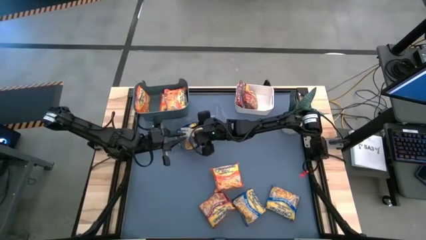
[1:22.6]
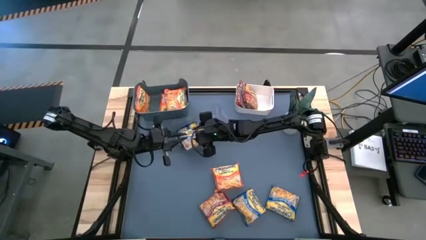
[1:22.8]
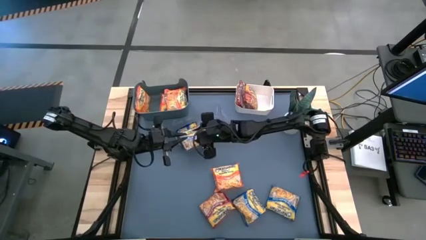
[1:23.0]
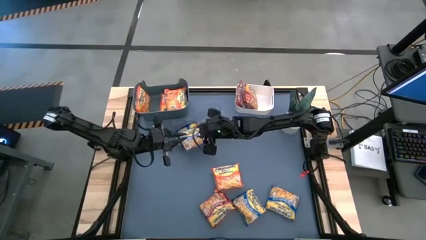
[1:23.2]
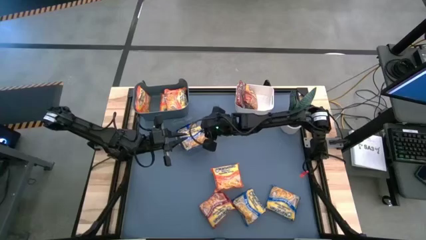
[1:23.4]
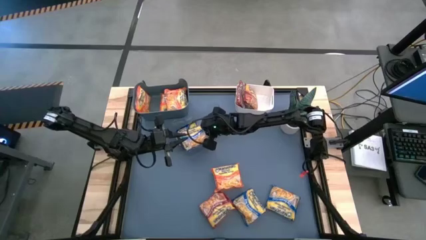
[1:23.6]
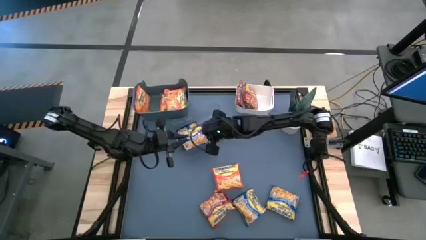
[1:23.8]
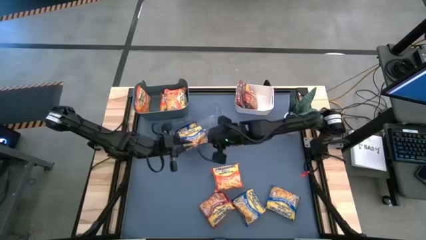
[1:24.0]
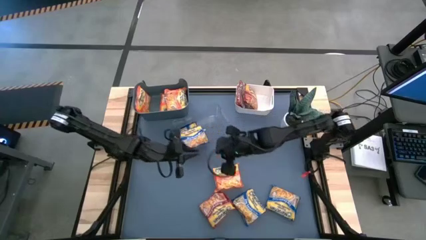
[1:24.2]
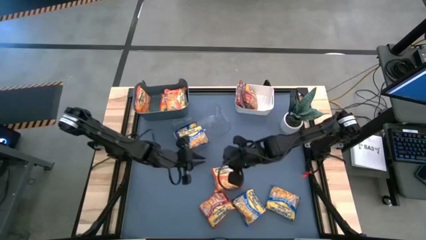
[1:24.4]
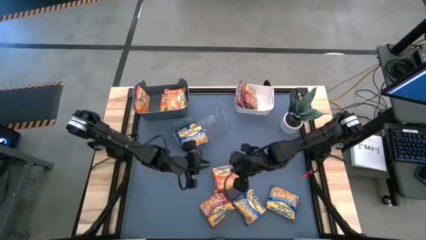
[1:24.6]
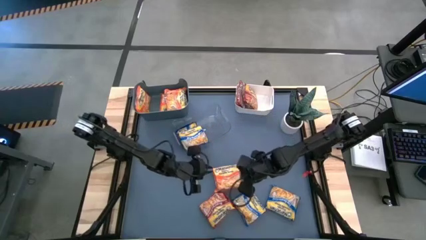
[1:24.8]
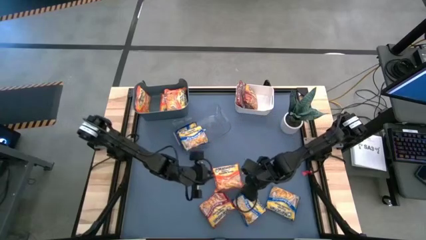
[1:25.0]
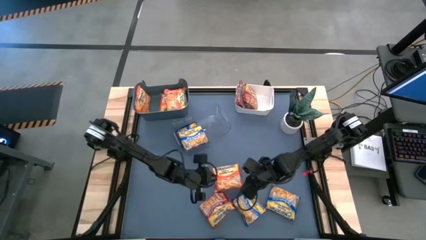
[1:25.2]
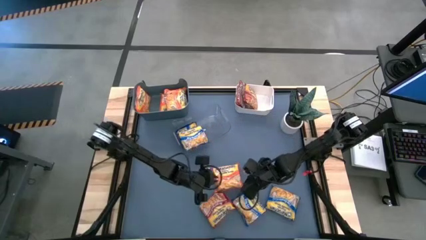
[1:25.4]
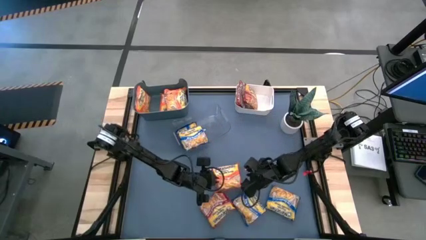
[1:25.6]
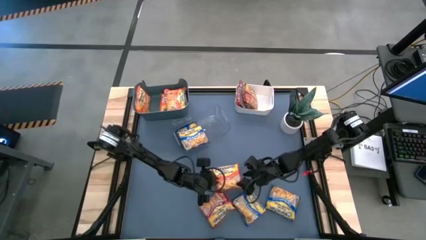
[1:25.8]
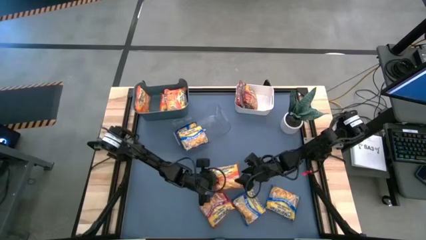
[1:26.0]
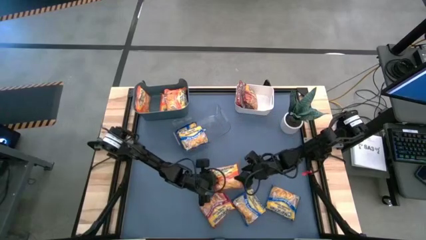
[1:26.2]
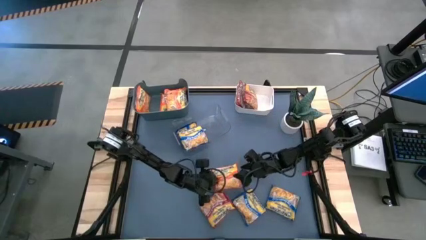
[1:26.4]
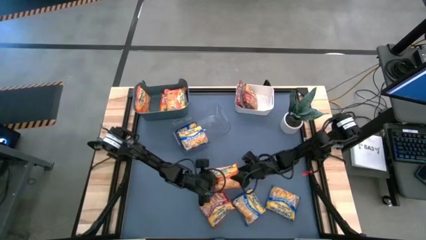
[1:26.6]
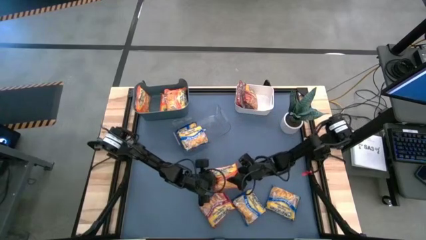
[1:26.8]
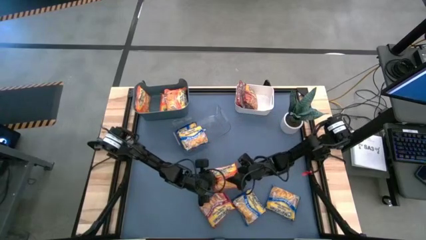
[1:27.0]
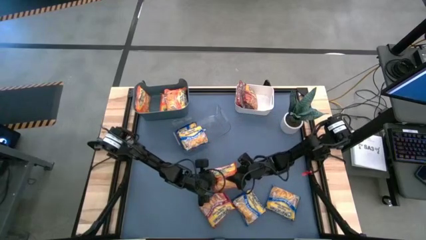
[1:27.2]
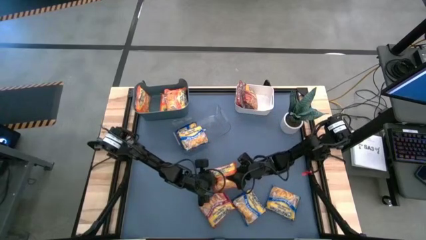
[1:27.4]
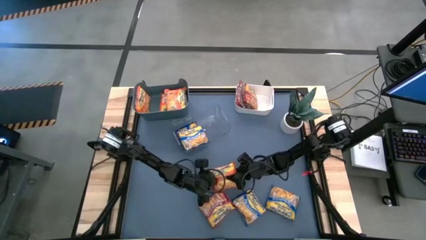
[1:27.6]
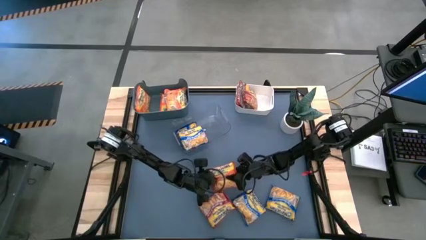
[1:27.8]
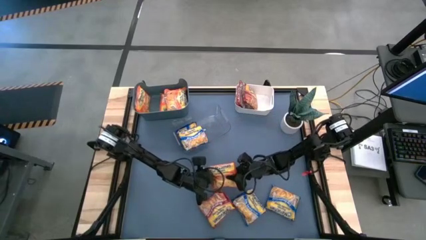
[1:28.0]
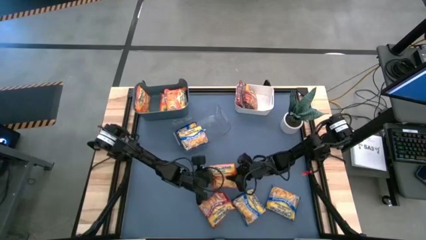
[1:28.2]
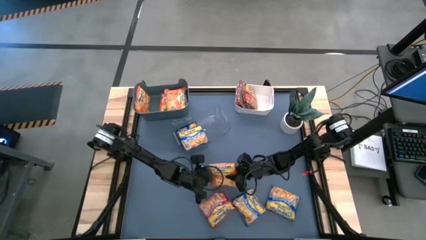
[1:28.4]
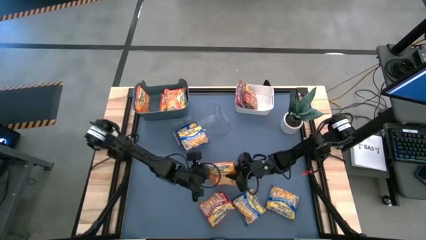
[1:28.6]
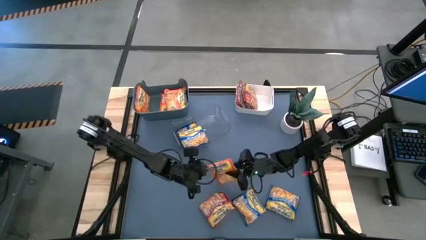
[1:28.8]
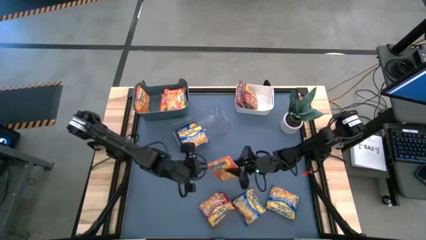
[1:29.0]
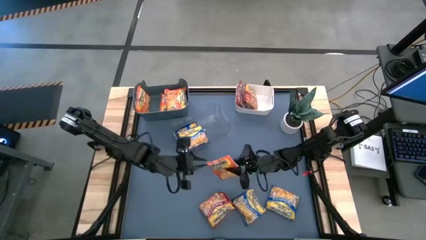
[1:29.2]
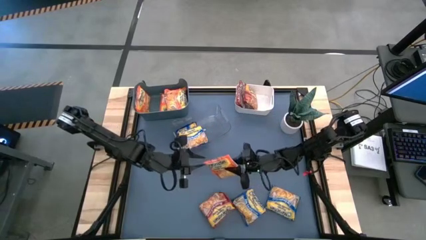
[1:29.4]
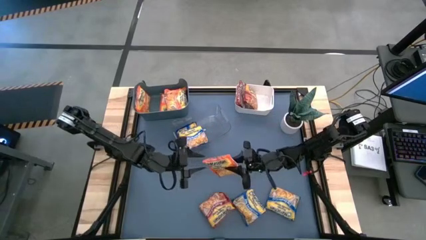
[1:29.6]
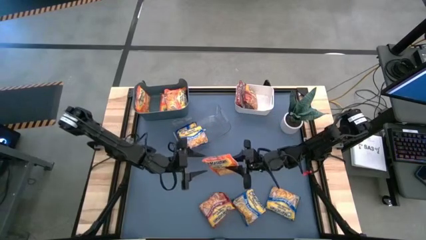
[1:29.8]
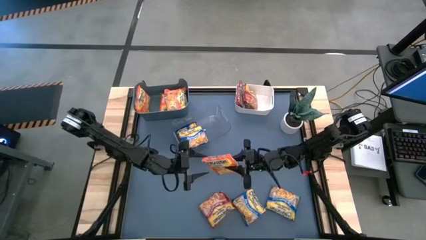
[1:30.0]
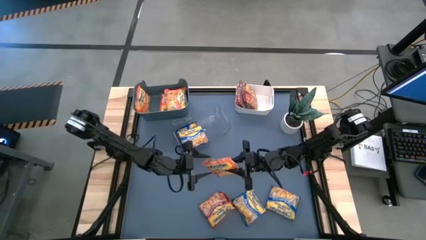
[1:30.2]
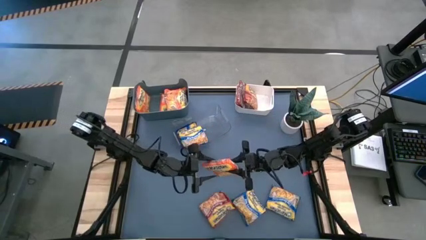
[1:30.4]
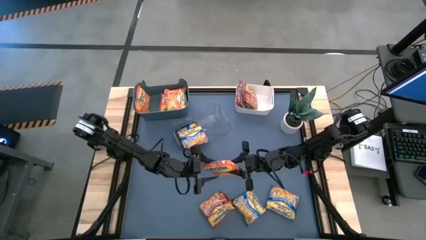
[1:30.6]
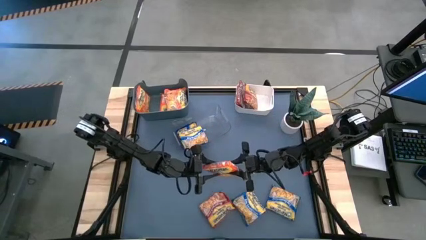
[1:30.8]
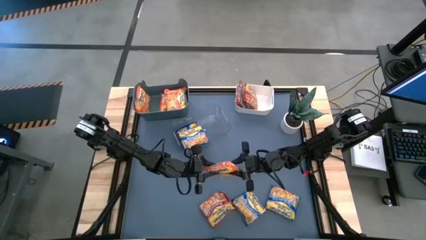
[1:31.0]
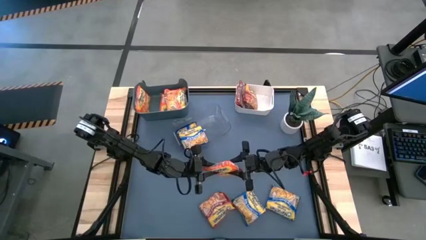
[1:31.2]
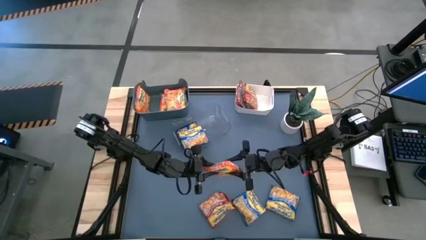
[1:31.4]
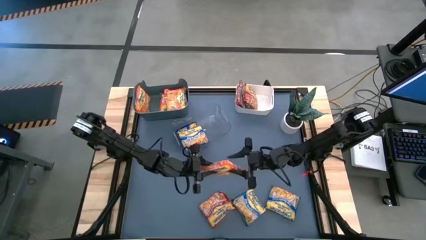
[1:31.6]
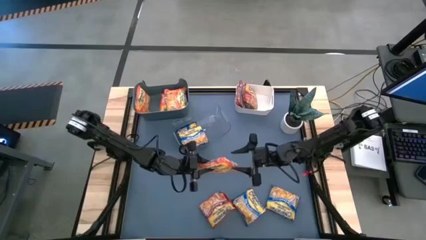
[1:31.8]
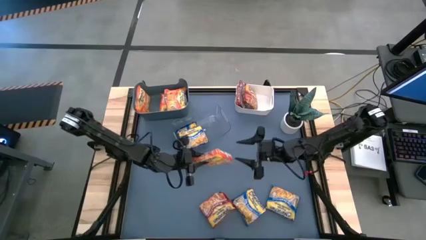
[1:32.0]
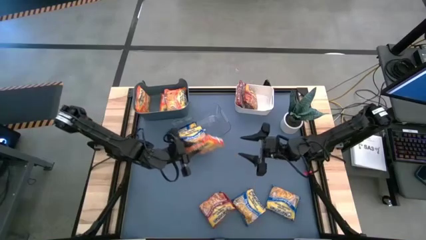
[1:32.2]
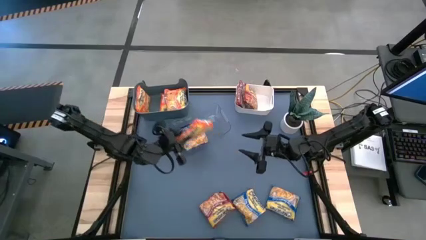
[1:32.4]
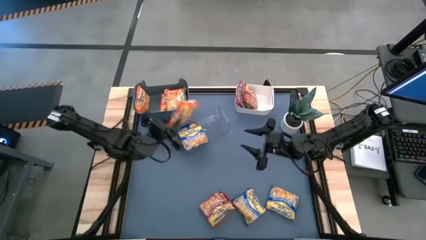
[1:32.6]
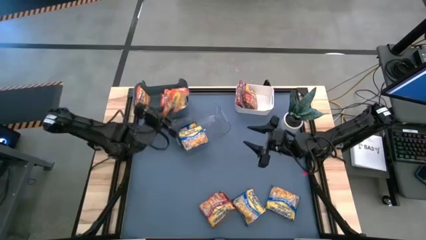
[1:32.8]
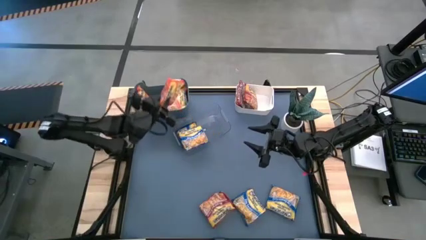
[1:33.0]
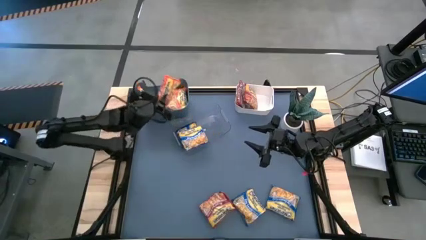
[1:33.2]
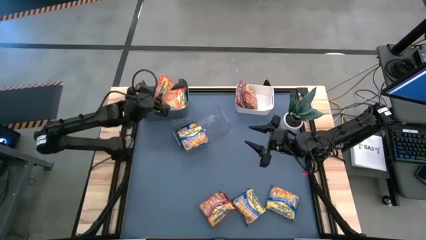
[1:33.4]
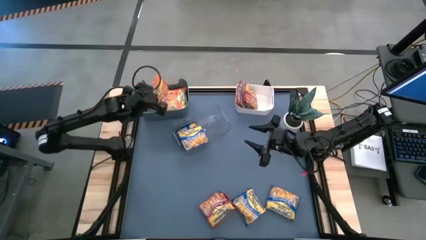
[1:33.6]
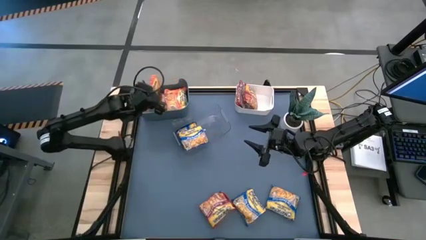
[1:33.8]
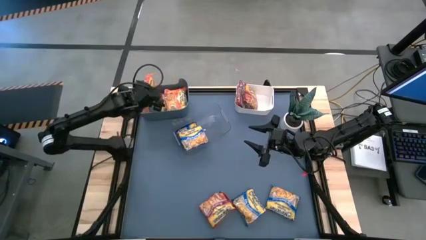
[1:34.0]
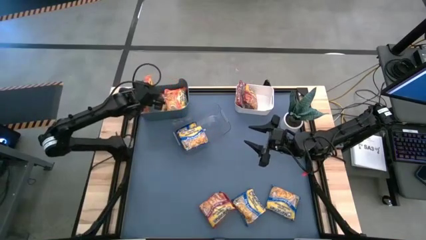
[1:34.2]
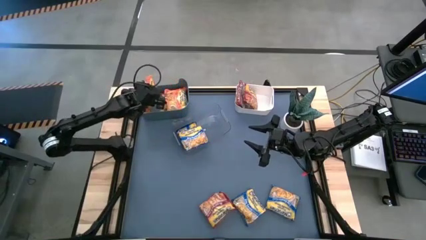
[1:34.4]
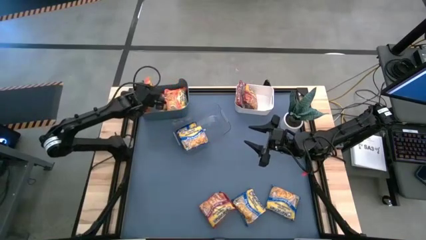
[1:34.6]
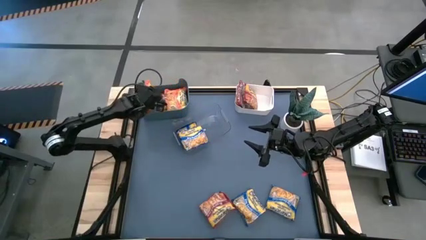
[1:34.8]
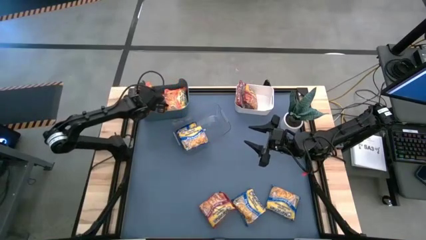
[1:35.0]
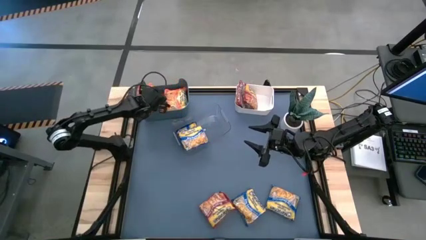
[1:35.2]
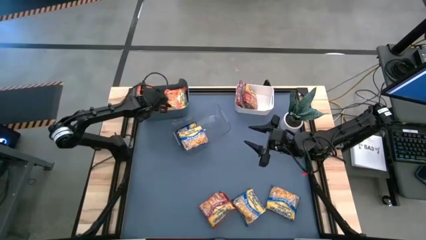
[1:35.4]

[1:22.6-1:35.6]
Task: Sort Maruchan noodles
Put the orange noodle pack into the blue bin

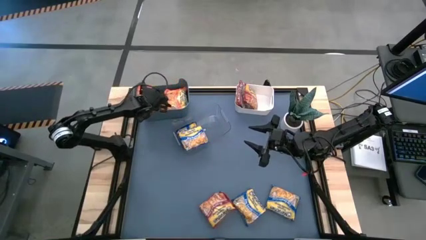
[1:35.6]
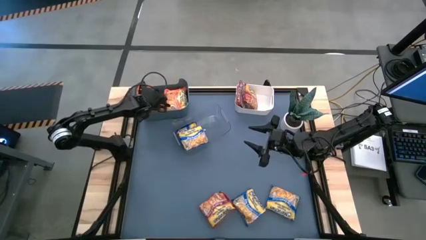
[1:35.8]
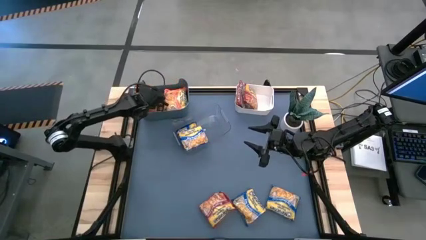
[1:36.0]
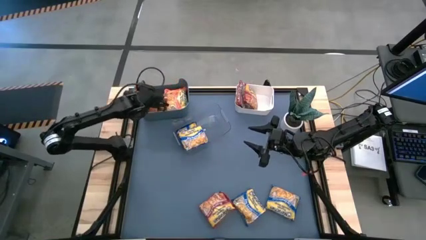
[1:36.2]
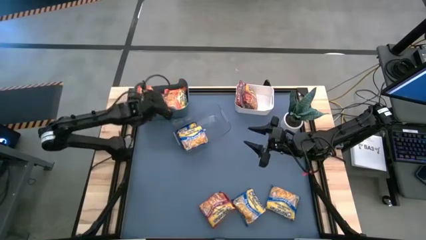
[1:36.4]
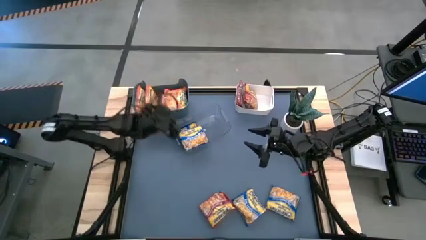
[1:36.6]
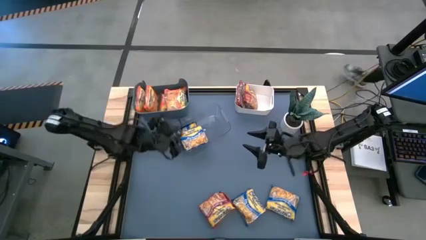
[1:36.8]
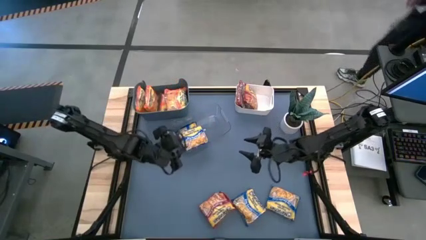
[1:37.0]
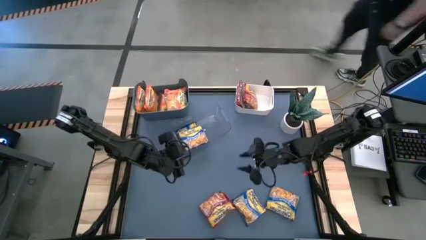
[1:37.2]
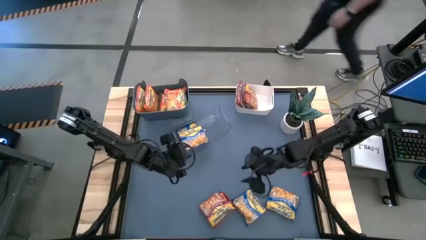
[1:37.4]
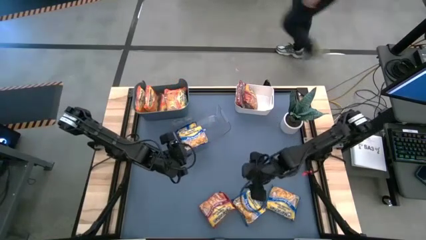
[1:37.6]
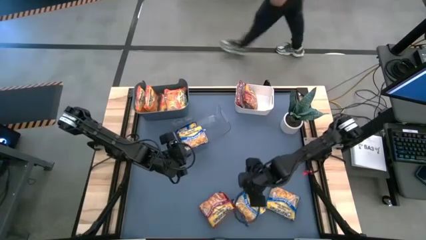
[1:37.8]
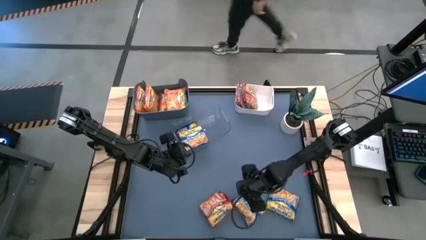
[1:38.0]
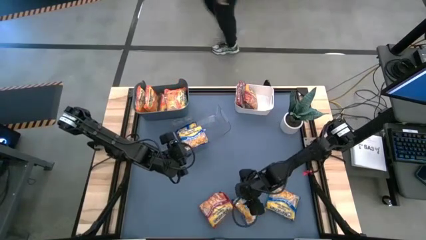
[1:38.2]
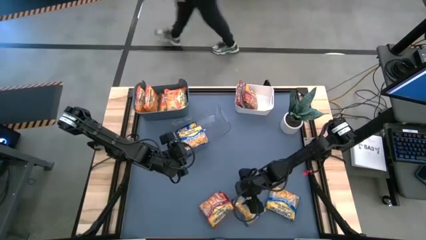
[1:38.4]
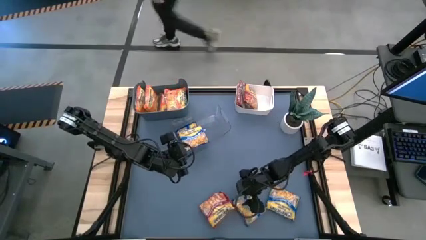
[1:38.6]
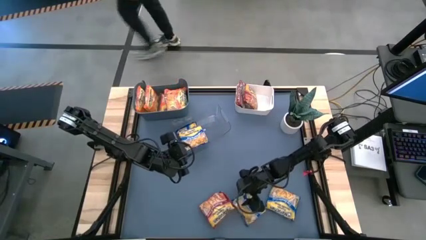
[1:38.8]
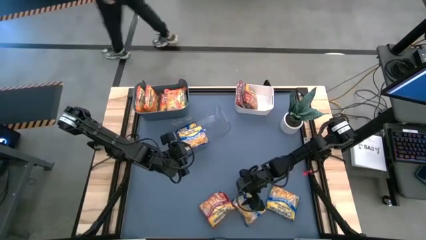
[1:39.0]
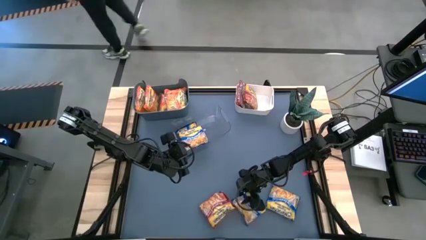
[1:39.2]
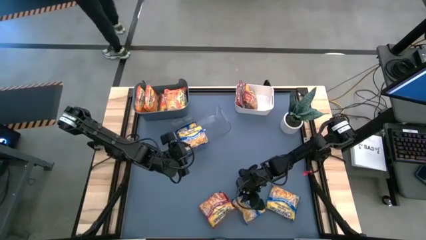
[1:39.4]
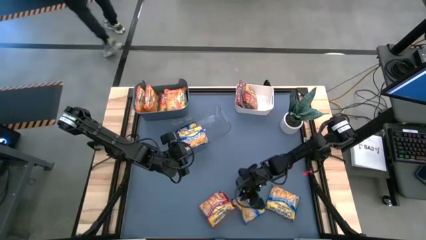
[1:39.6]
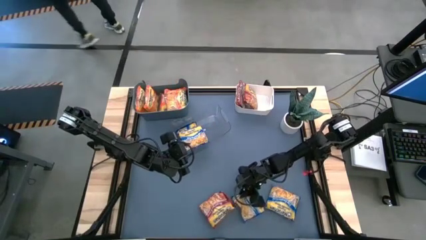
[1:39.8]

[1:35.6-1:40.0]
Put the blue noodle pack into the transparent bin
